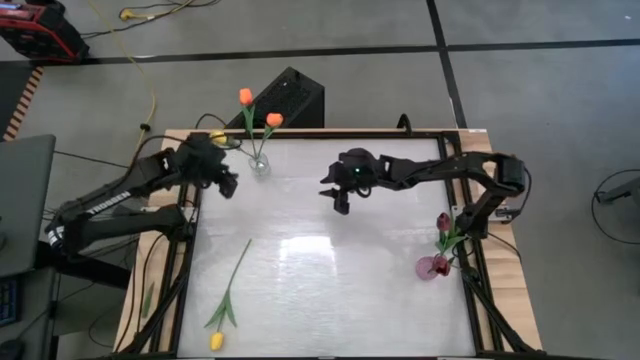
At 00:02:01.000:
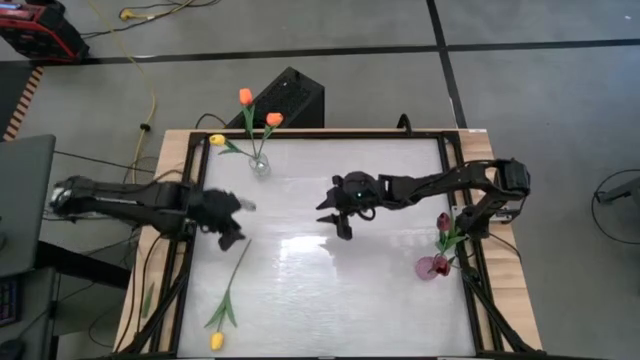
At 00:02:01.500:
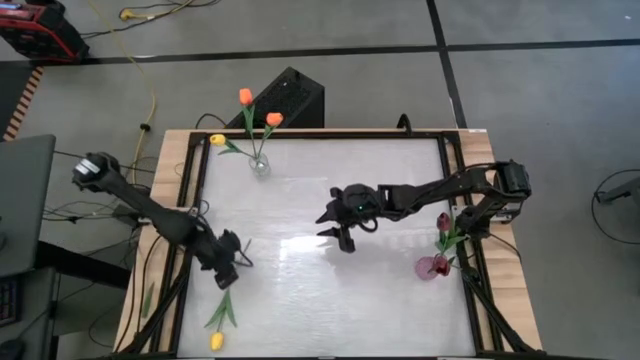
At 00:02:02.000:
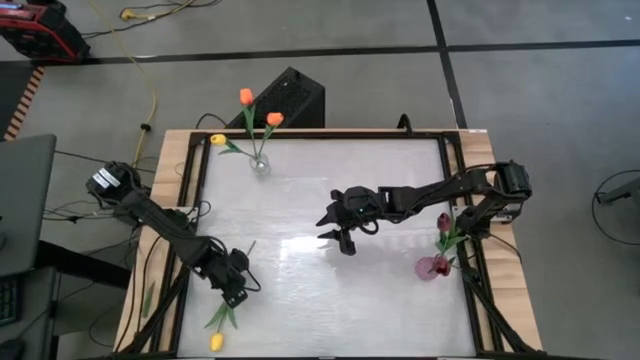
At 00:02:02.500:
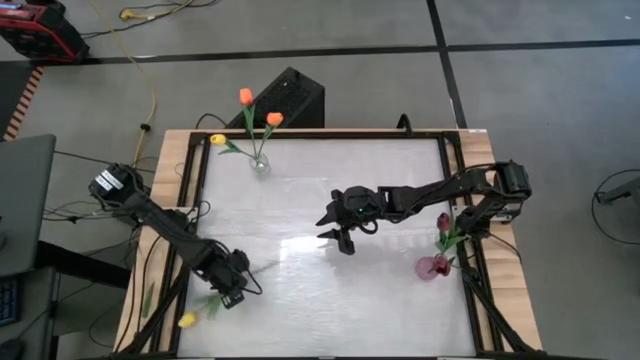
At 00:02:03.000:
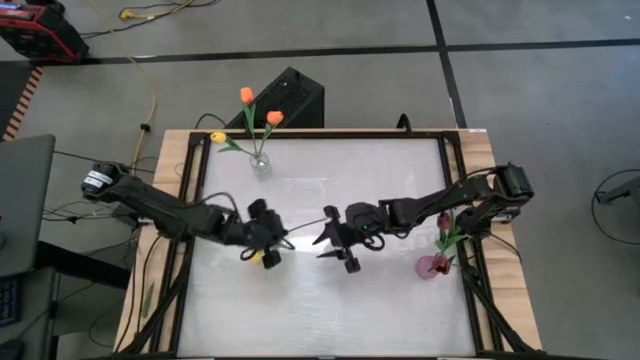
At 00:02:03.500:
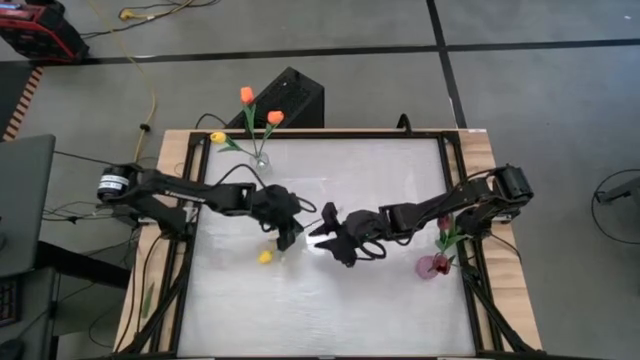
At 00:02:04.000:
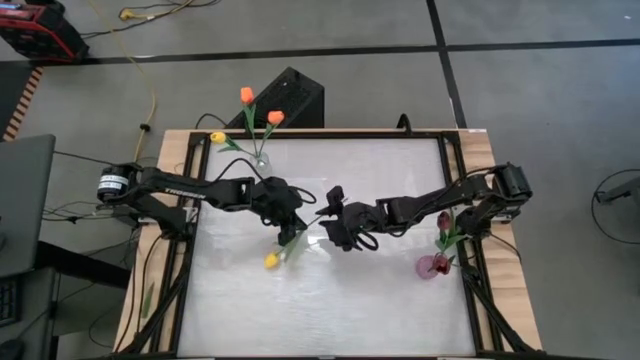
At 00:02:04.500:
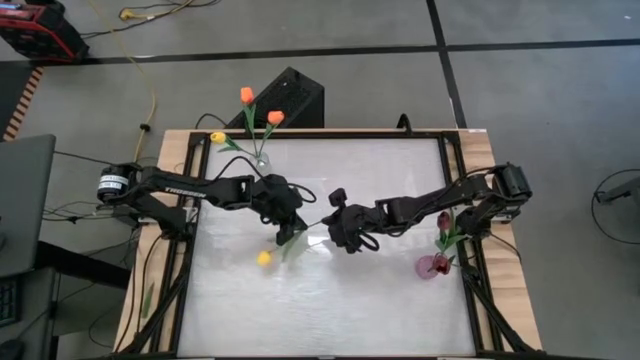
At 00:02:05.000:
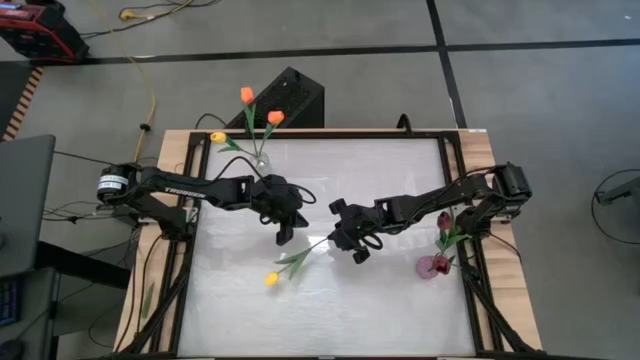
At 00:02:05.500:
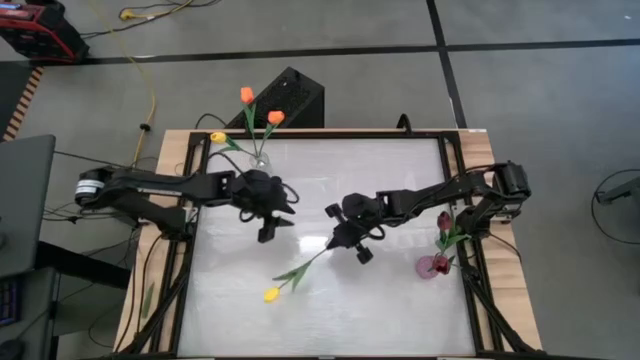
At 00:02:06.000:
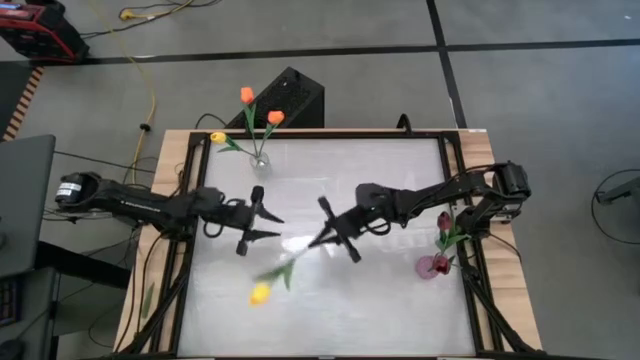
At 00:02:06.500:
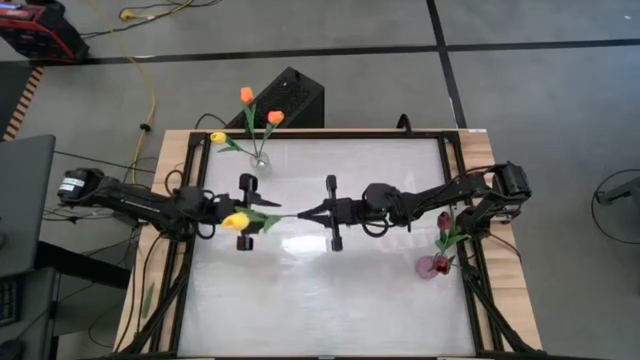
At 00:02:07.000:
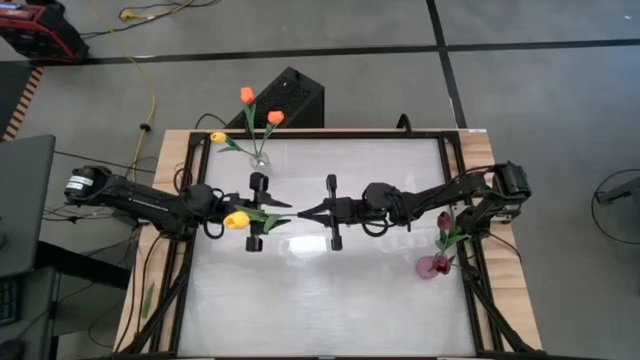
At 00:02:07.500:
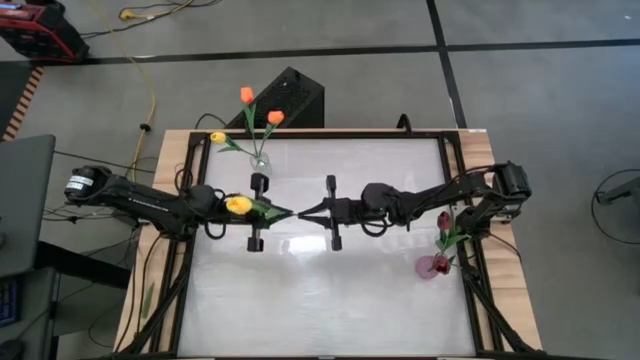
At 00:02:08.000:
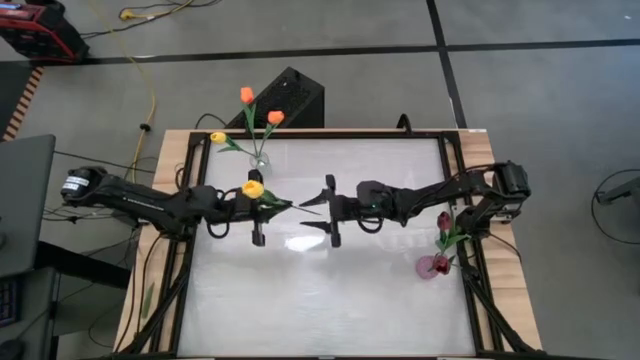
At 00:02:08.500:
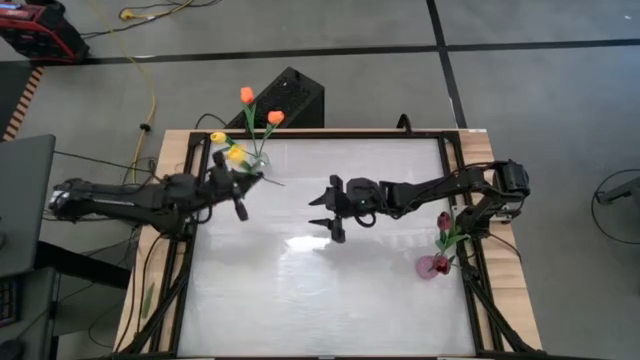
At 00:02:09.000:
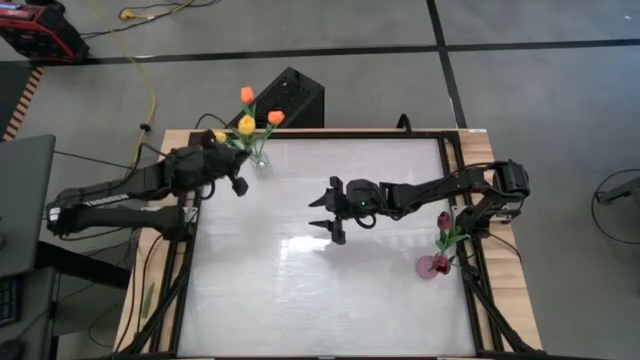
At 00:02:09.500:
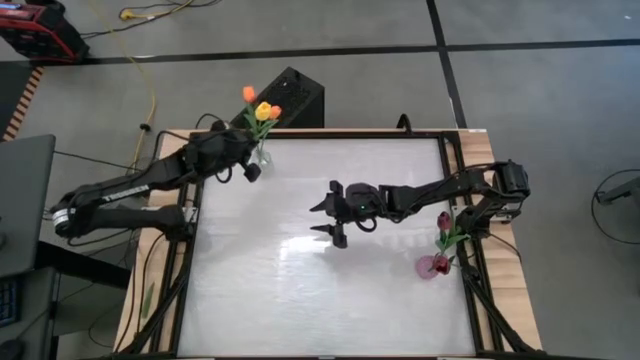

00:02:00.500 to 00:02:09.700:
Task: Sort flowers into vase by color
Put the yellow flower into the transparent vase

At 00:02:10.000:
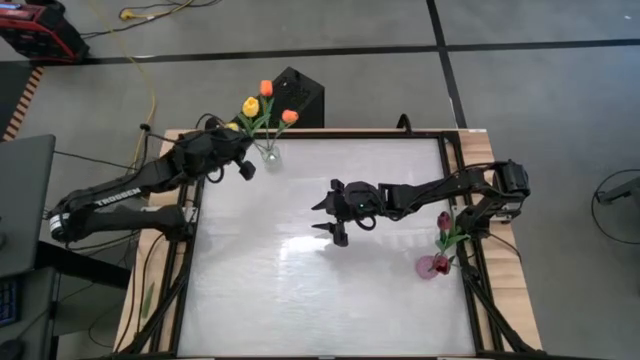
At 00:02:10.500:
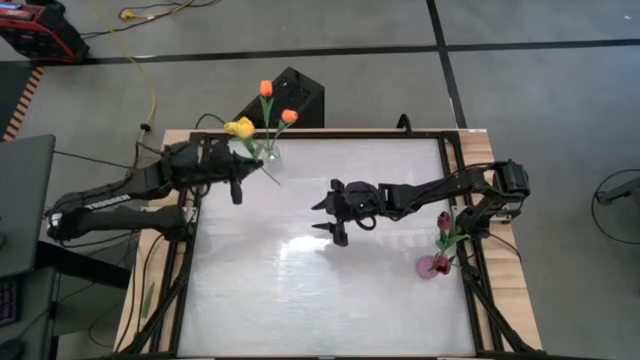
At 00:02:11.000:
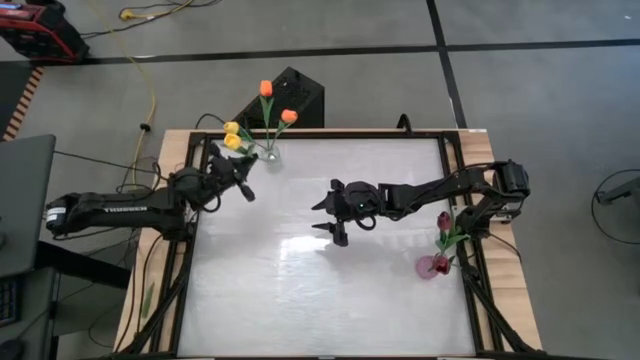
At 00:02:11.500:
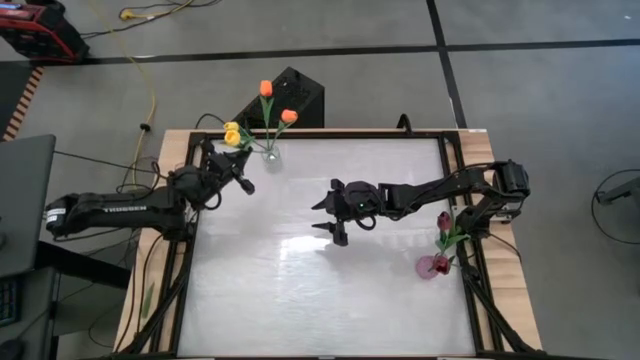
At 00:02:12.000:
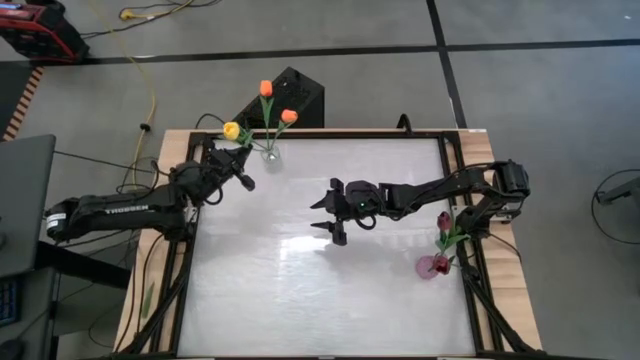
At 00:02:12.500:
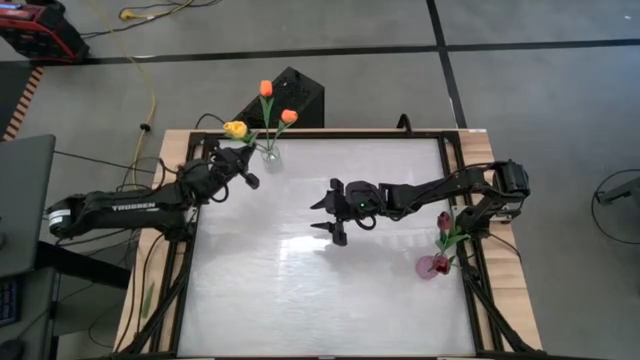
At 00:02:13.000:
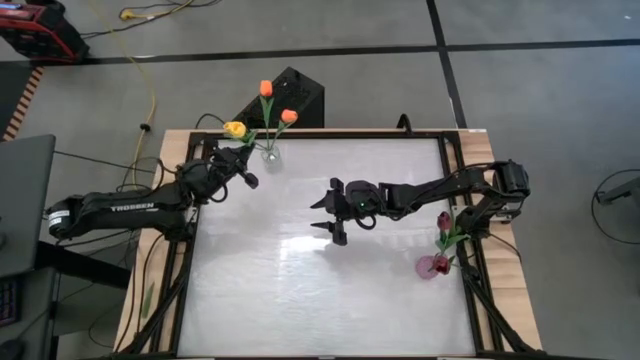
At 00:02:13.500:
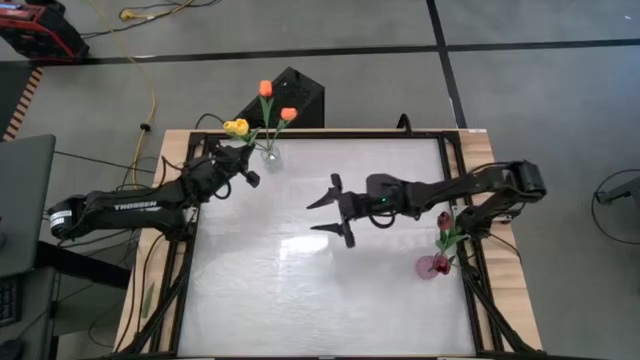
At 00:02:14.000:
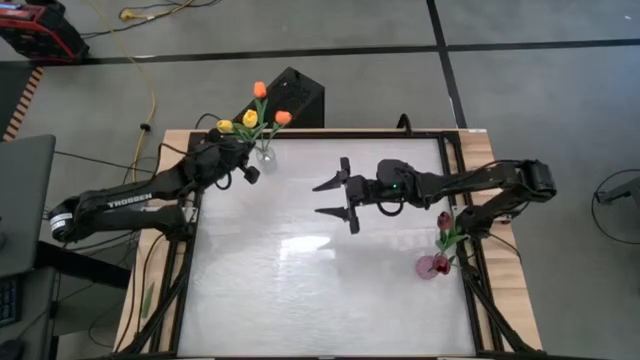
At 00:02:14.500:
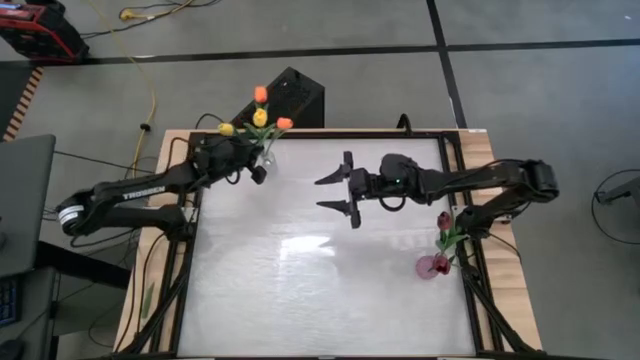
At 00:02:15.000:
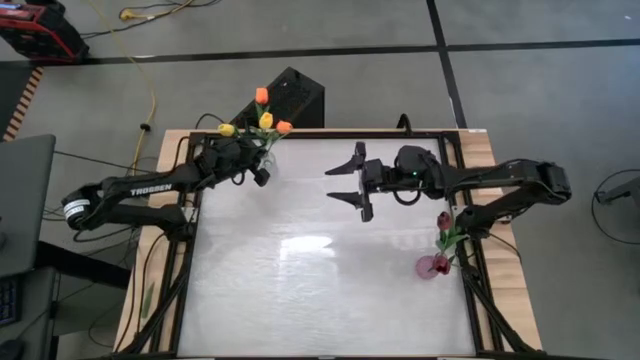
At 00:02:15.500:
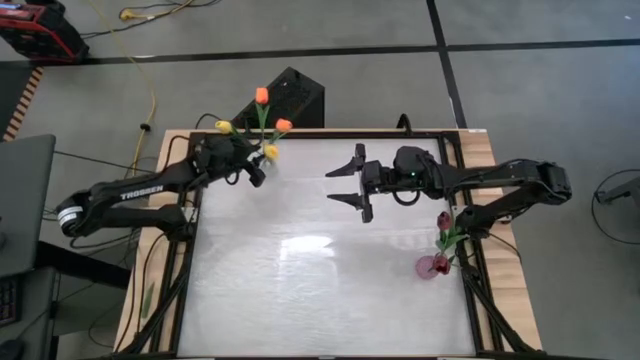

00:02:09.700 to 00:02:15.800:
Put the yellow flower into the transparent vase

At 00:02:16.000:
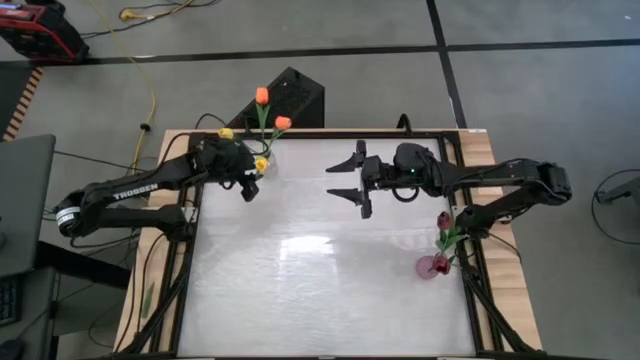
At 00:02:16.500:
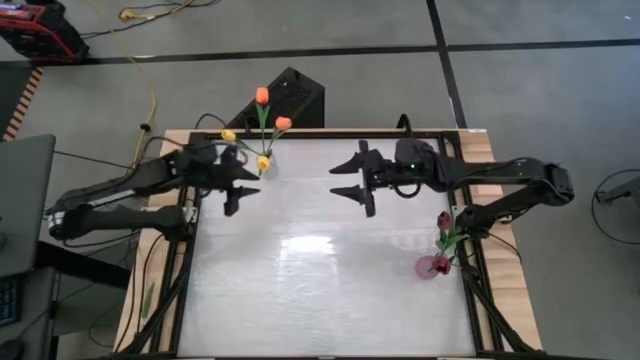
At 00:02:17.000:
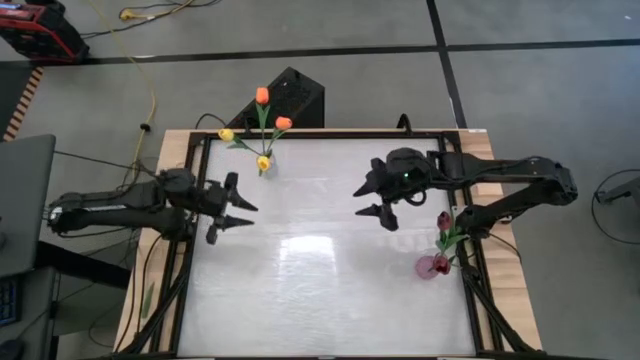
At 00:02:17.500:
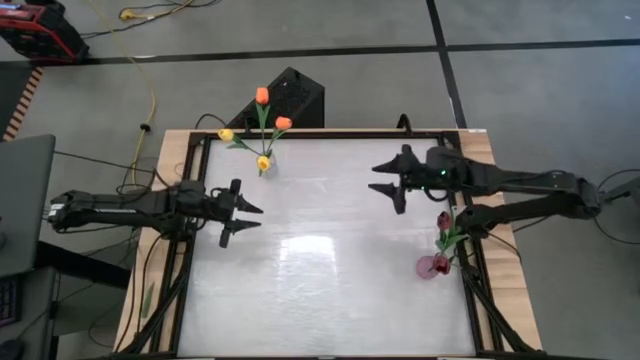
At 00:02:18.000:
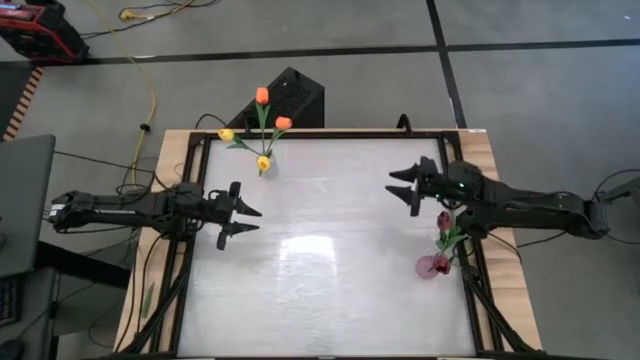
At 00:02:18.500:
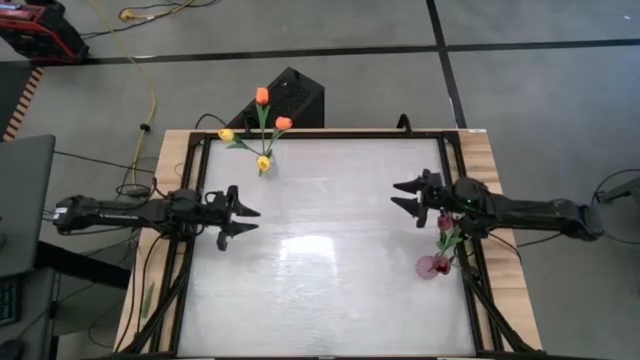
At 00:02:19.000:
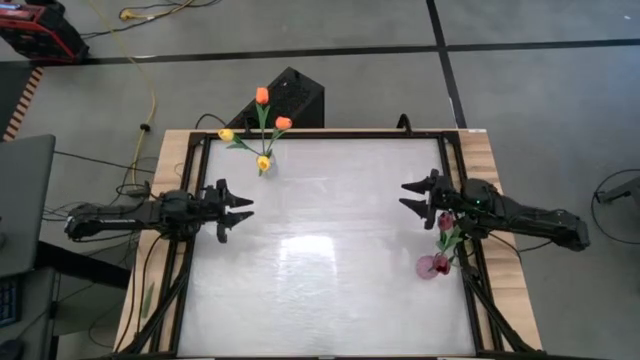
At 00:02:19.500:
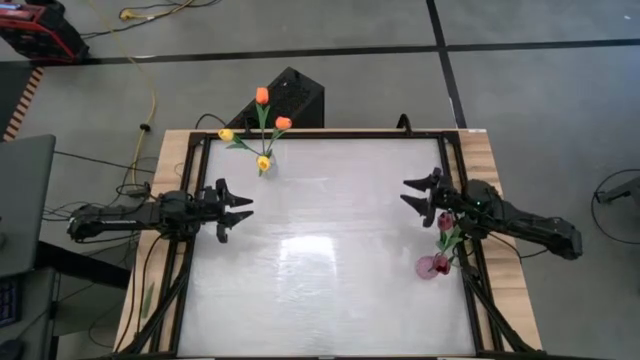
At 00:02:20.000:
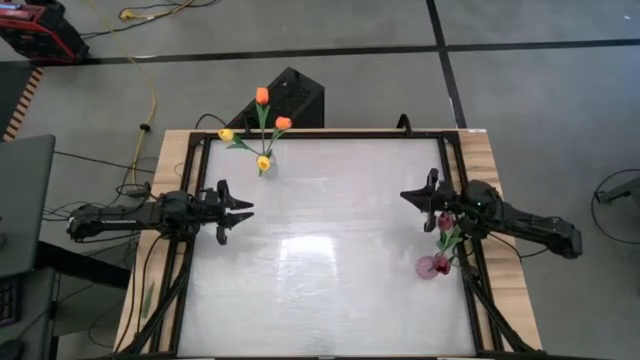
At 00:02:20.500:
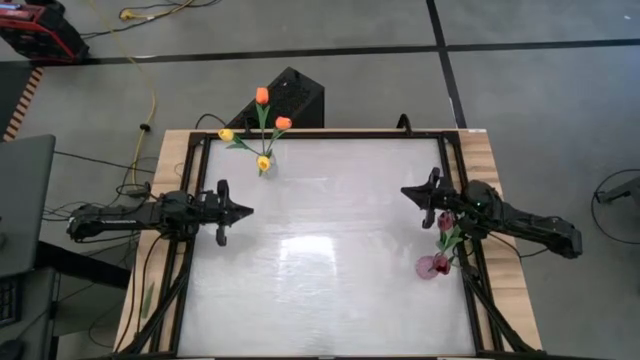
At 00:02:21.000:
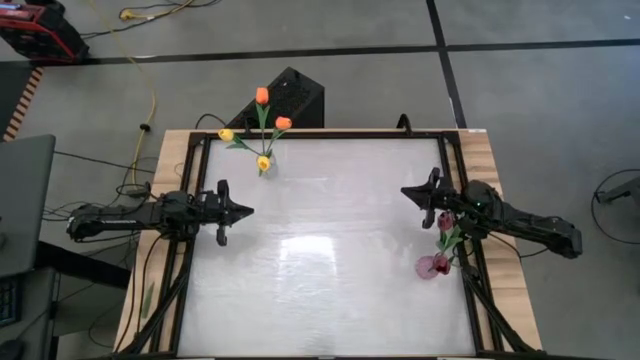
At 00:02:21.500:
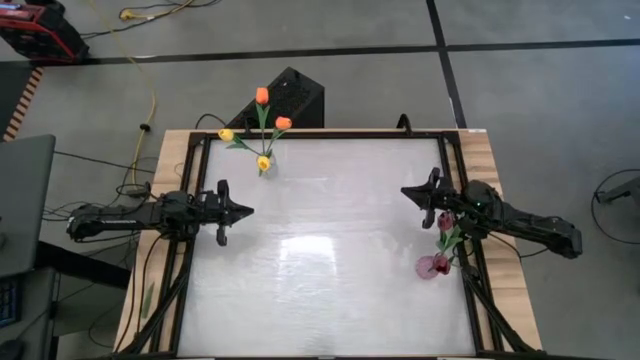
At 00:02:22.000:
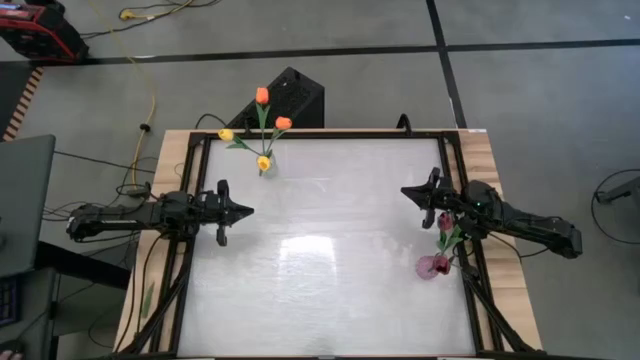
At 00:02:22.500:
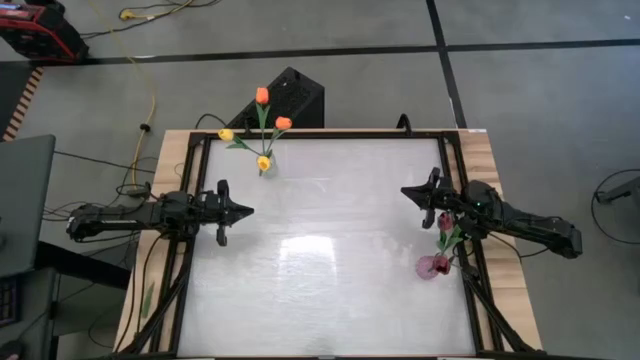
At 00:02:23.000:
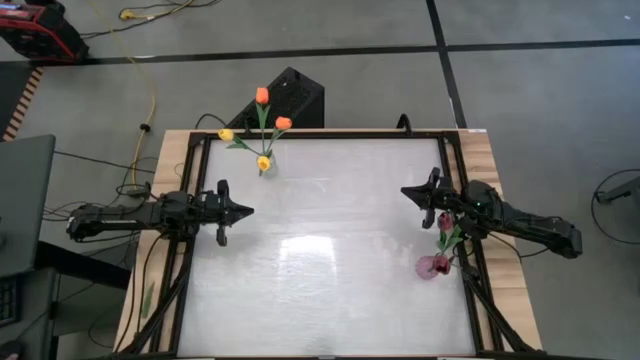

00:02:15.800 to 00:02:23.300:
Return to Home Position
